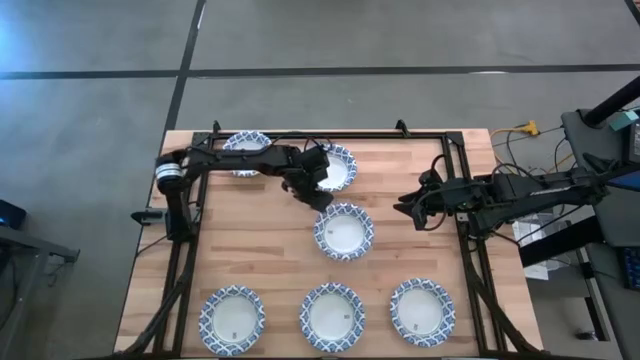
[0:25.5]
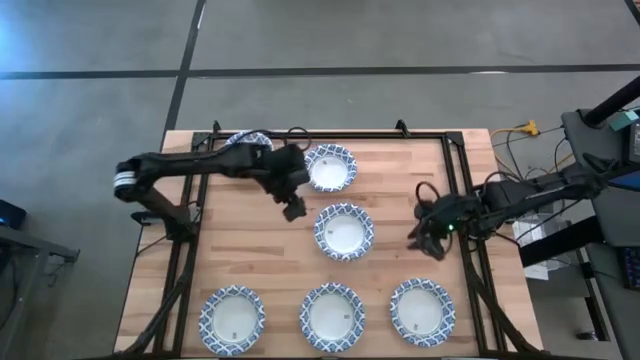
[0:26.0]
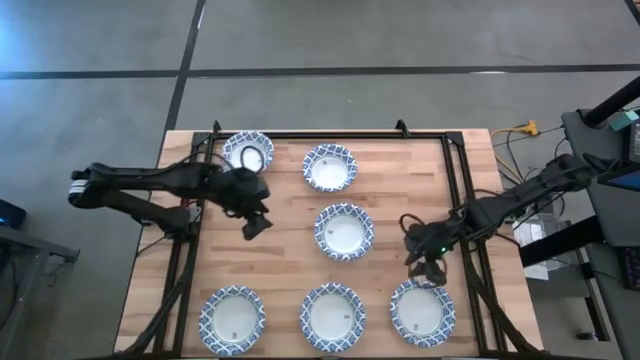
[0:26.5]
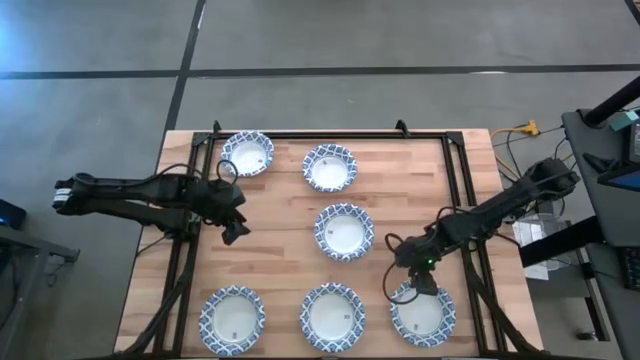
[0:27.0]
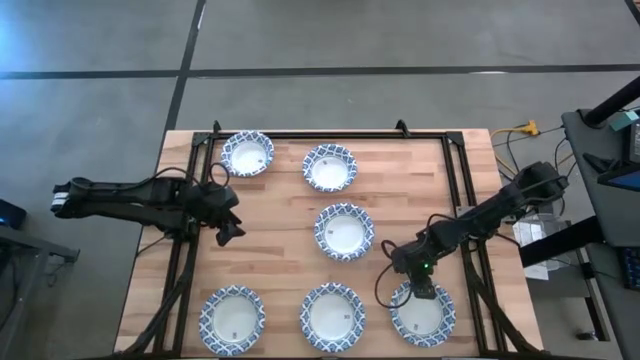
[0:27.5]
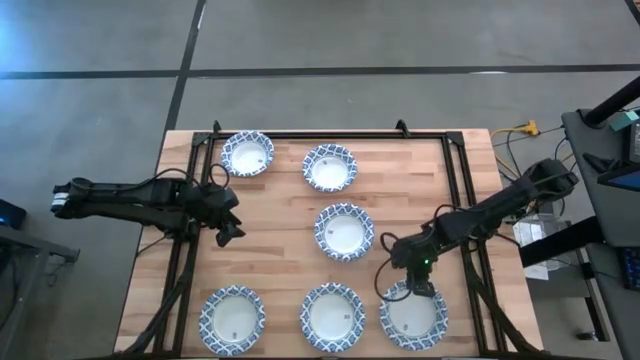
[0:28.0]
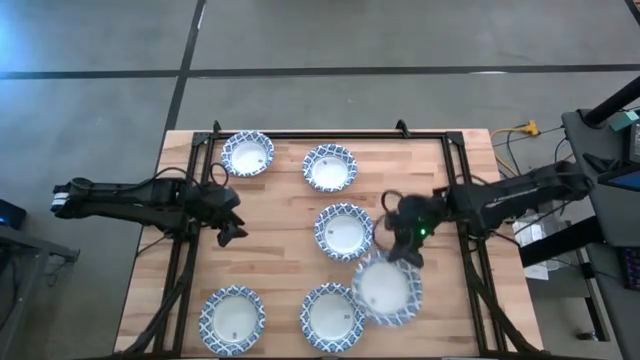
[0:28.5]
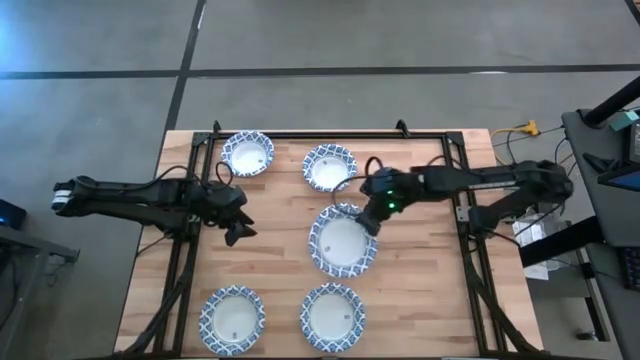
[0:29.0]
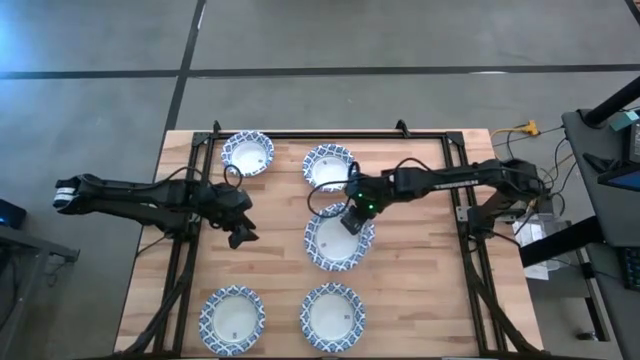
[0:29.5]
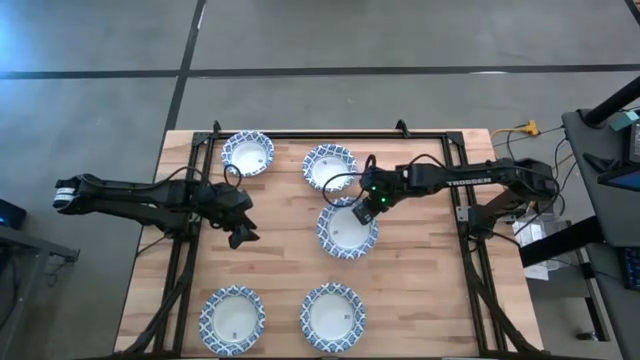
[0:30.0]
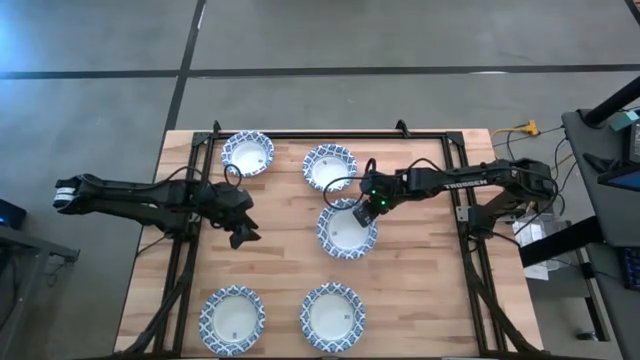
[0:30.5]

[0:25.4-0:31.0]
Task: Nest bowls inside each other
Stack the blue paper bowl into the blue paper bowl

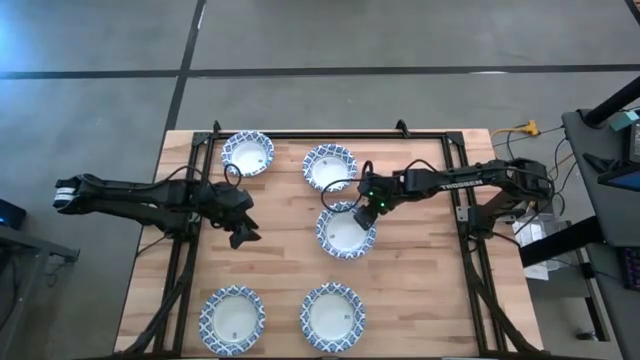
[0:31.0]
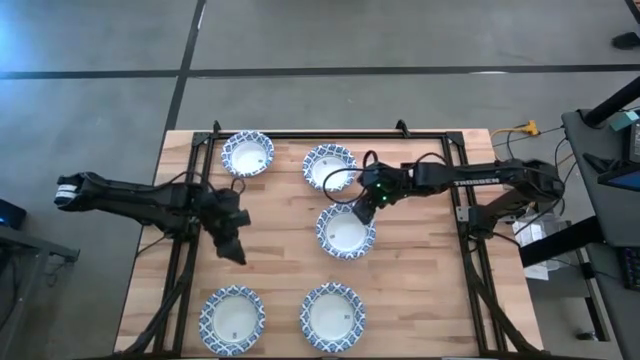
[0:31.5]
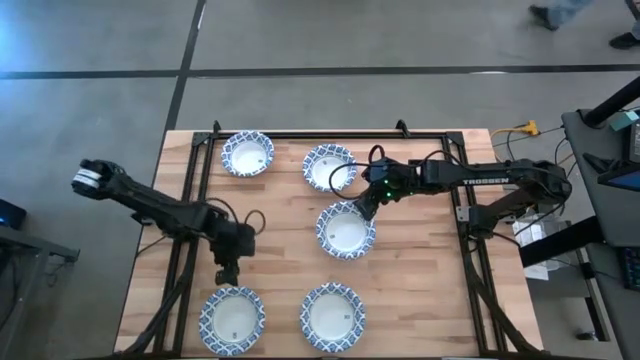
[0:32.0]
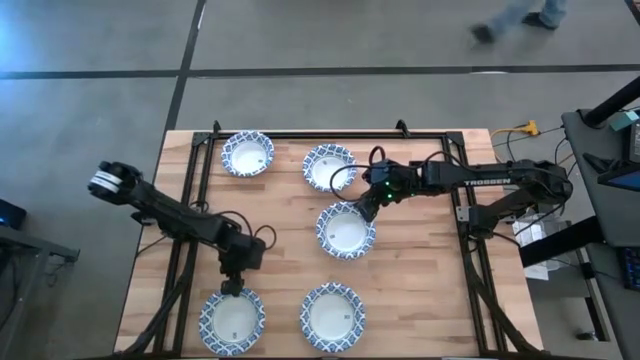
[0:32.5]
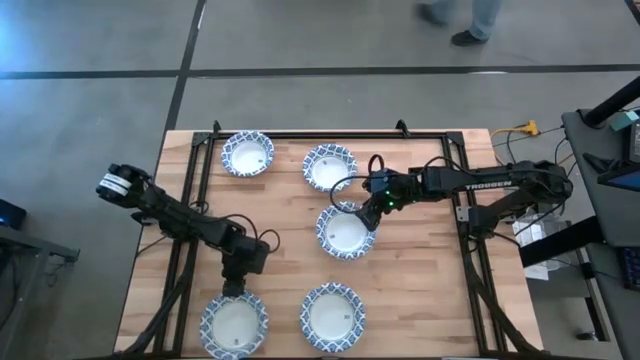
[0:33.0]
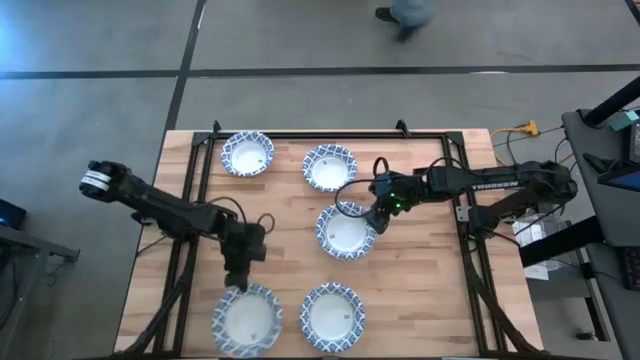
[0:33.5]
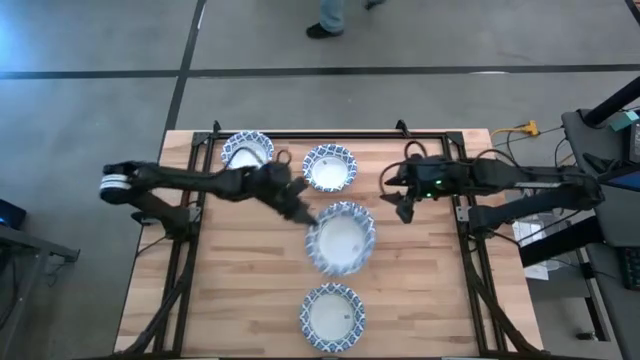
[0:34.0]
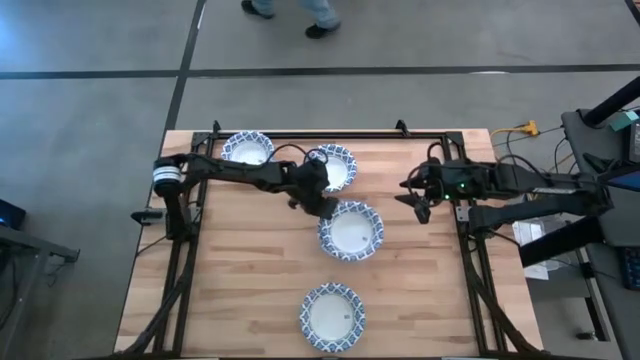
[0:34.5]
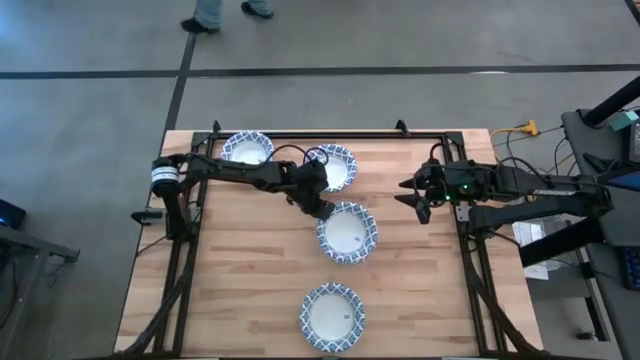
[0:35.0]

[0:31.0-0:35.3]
Stack the blue paper bowl into the blue paper bowl

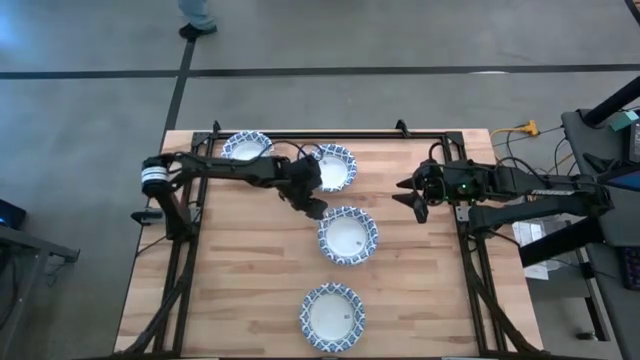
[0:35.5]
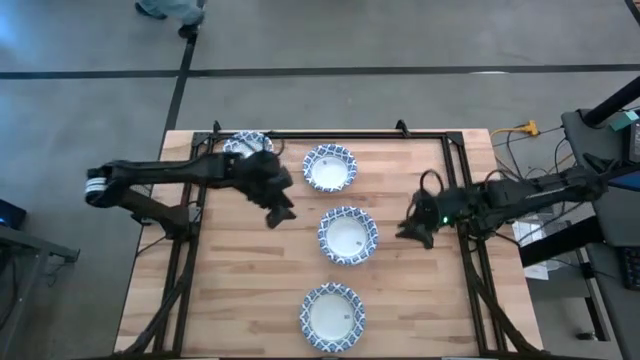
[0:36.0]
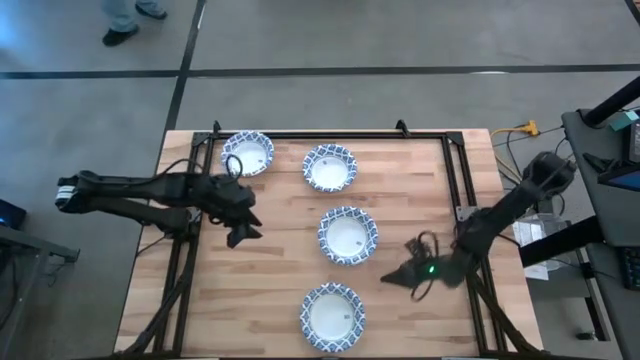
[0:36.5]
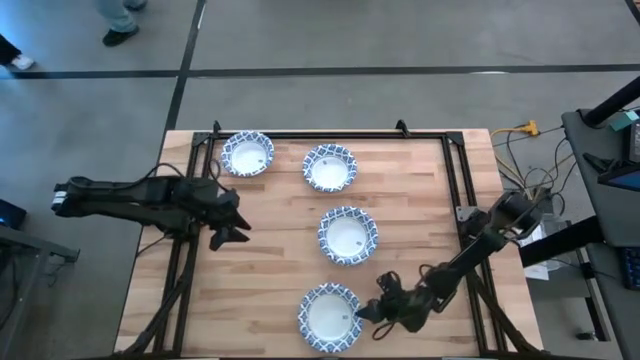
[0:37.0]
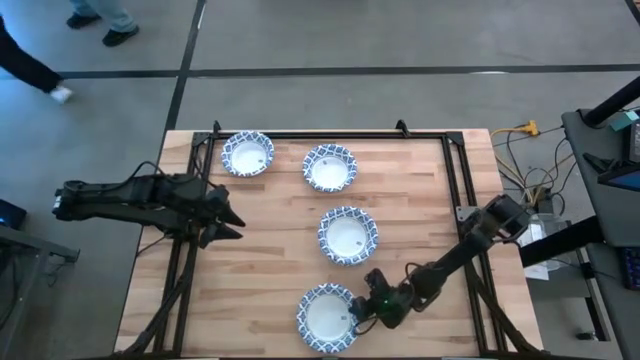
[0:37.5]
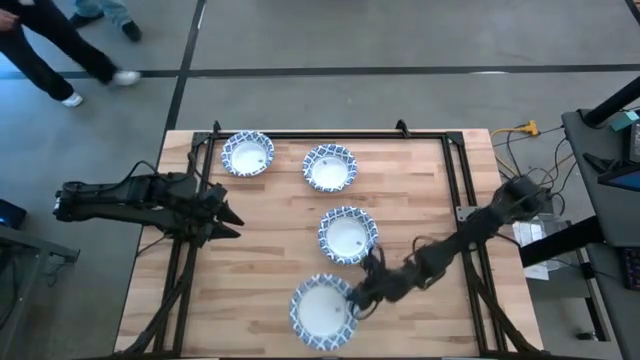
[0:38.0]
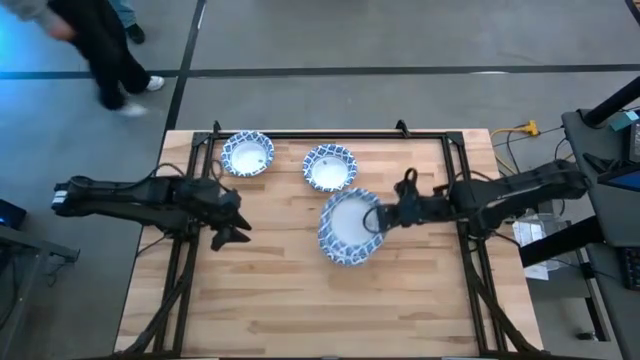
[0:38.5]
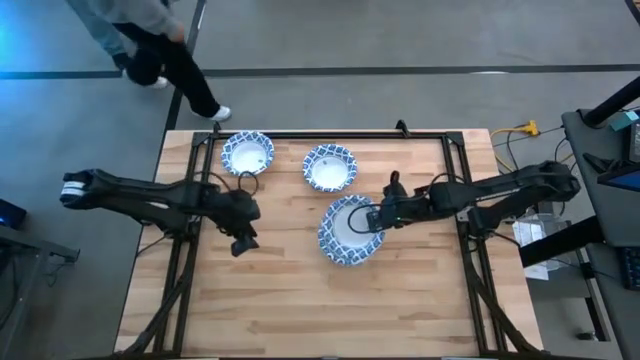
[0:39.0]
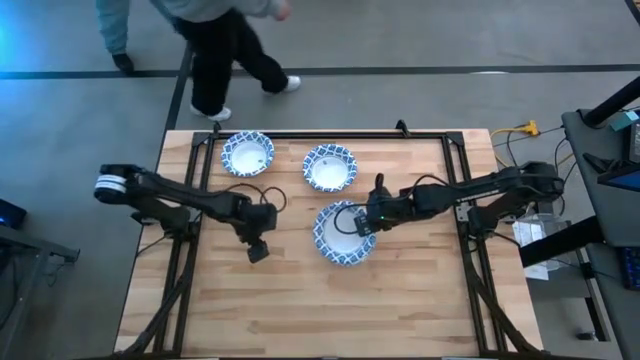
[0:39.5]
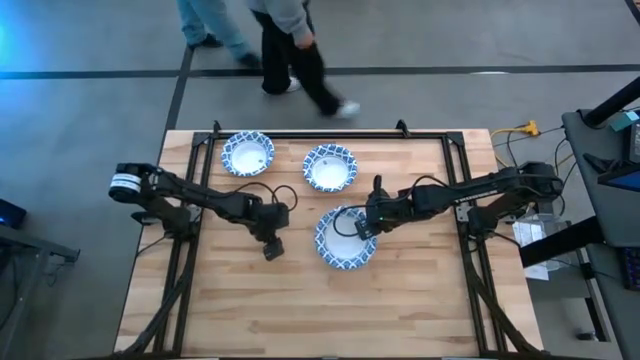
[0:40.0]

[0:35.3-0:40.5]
Stack the blue paper bowl into the blue paper bowl

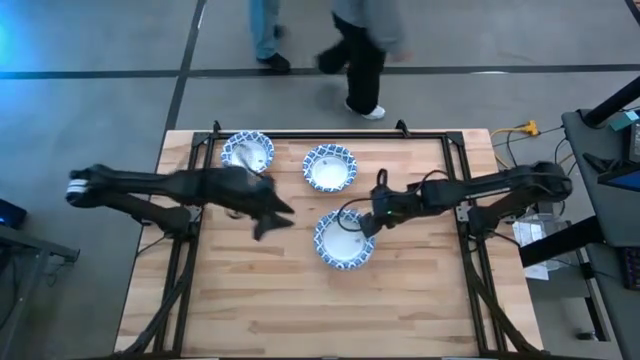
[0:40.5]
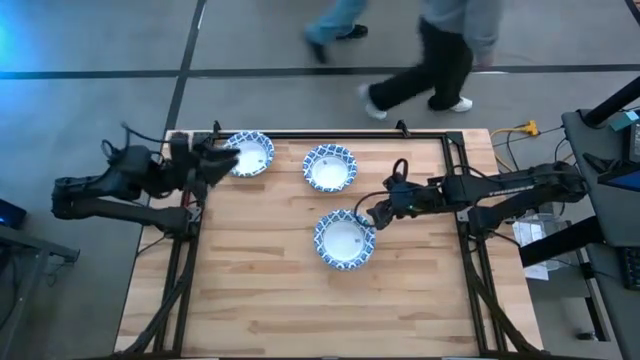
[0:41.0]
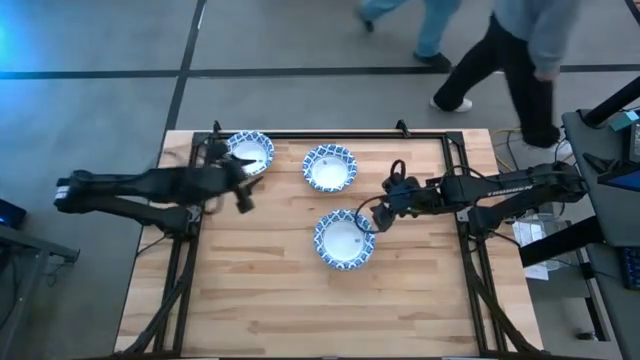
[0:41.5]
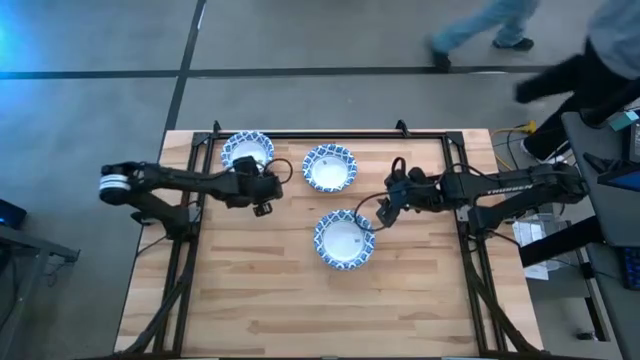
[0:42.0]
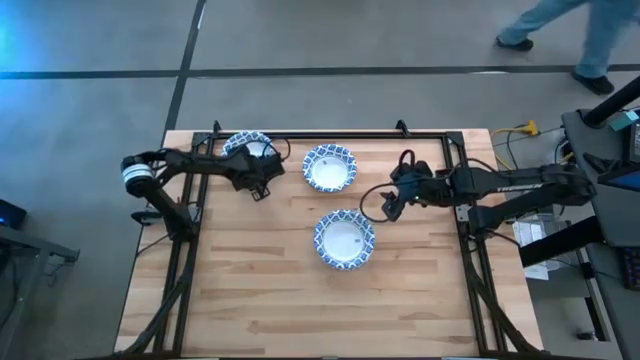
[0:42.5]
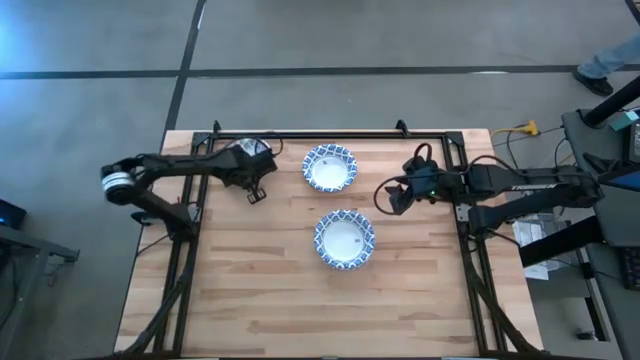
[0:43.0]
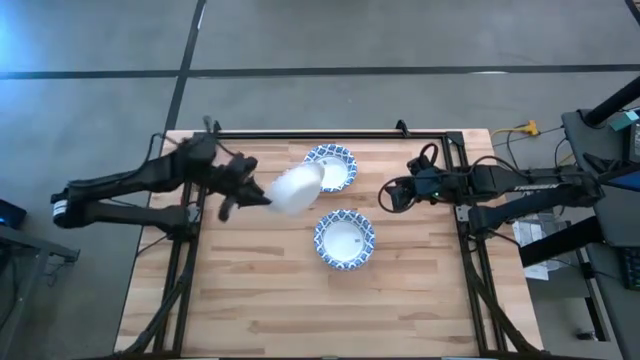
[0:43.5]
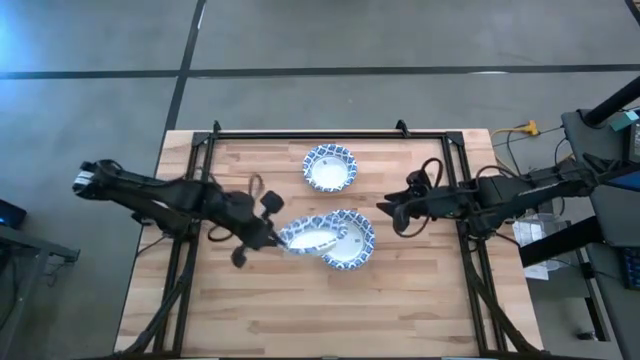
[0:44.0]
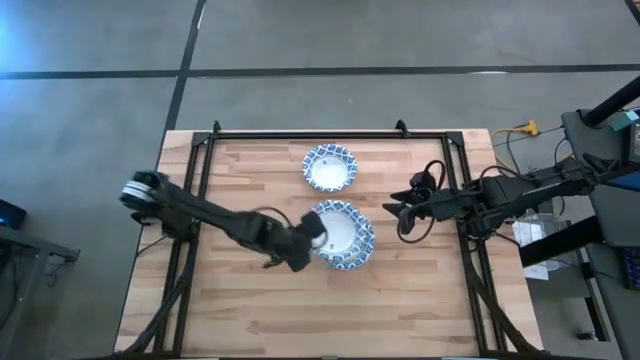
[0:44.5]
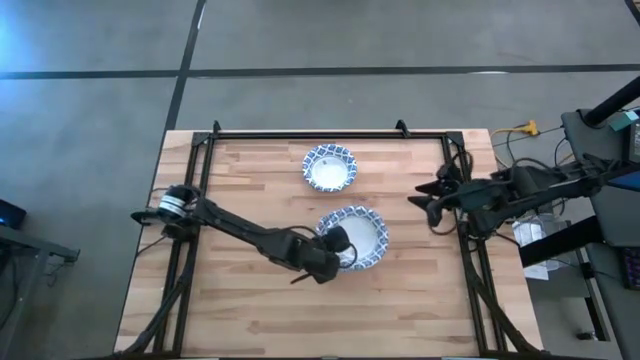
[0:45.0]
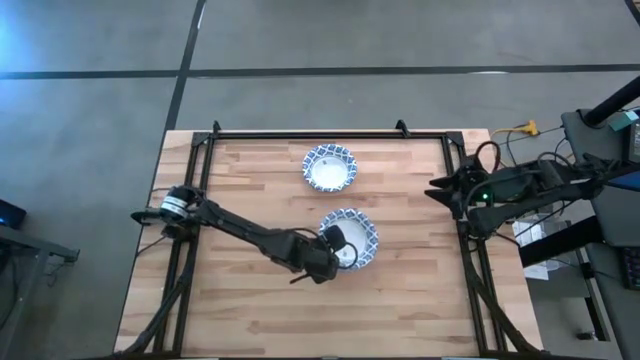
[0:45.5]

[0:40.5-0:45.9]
Stack the blue paper bowl into the blue paper bowl
